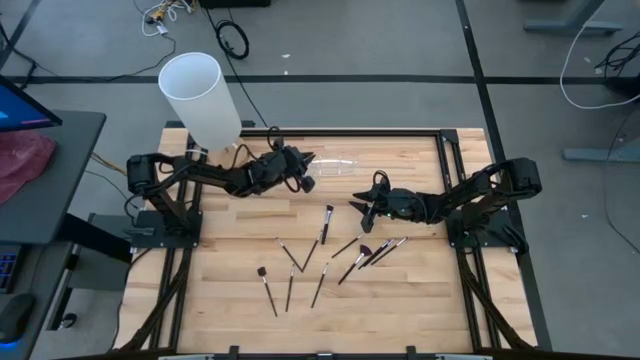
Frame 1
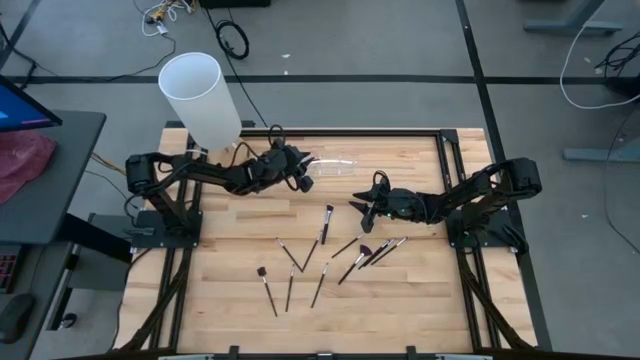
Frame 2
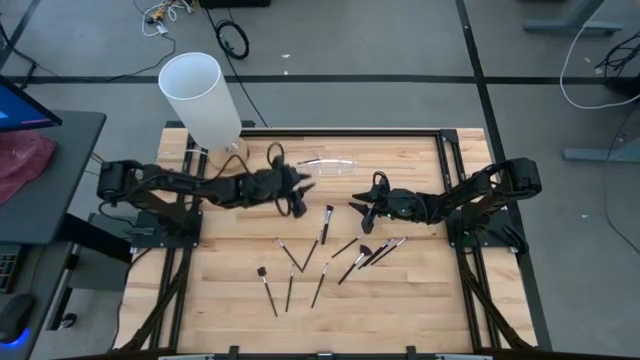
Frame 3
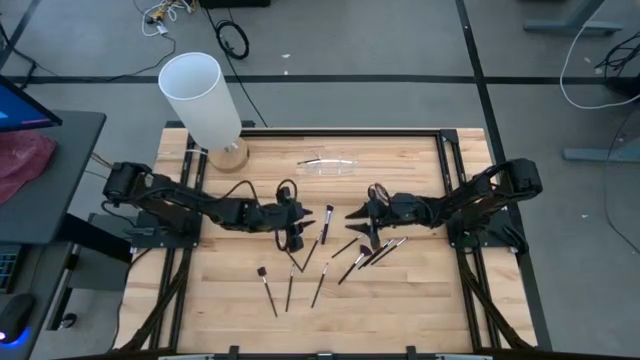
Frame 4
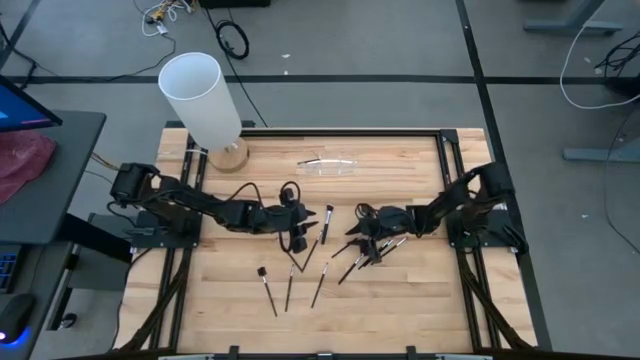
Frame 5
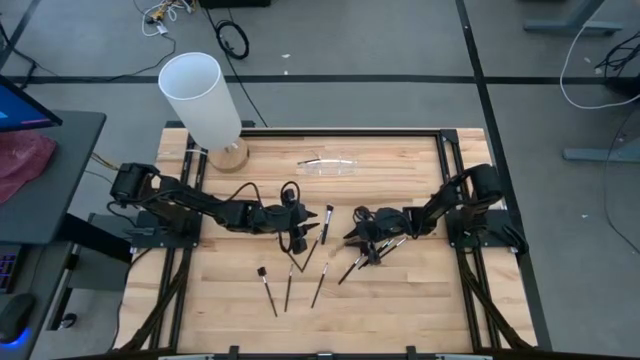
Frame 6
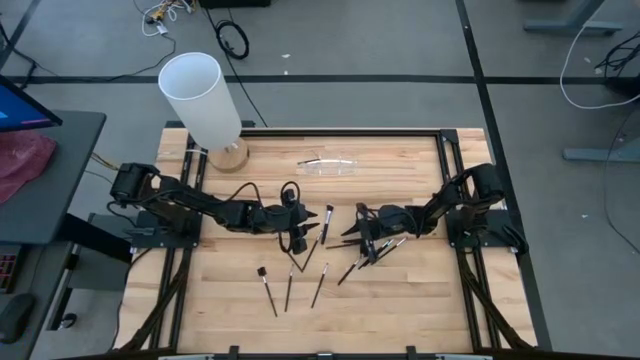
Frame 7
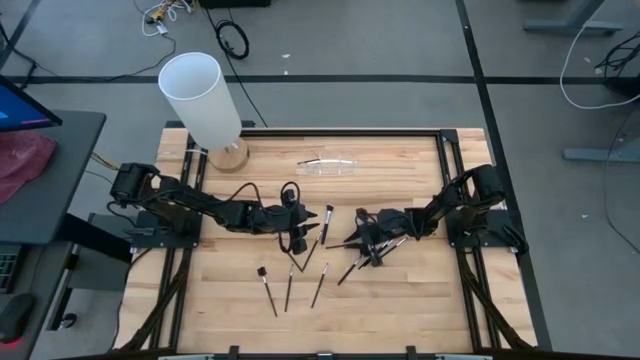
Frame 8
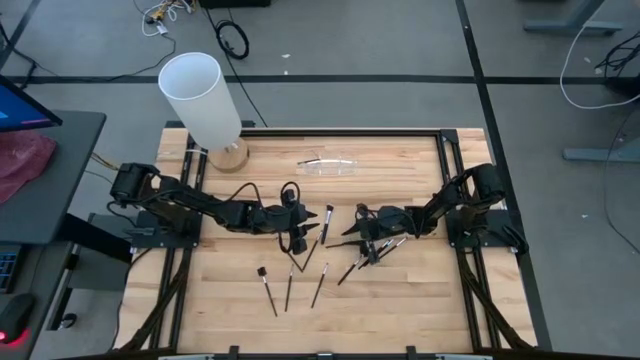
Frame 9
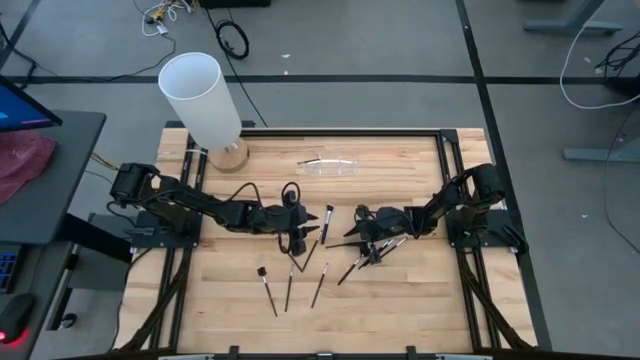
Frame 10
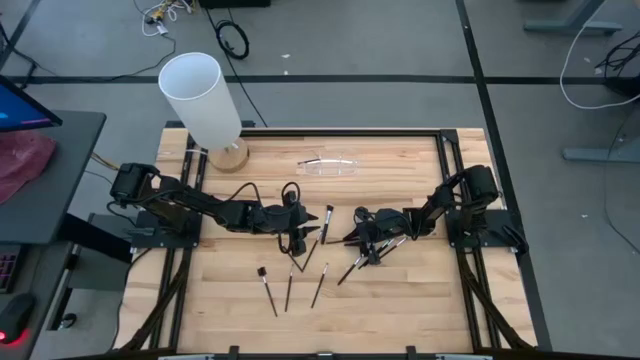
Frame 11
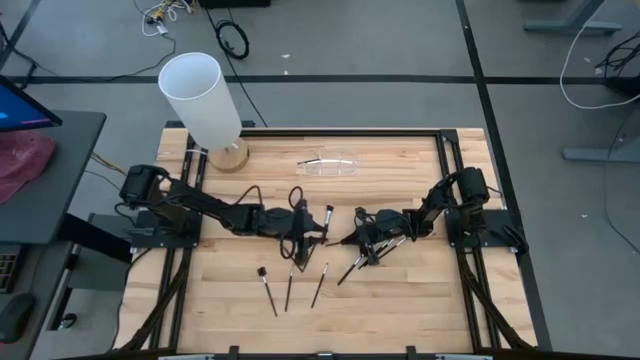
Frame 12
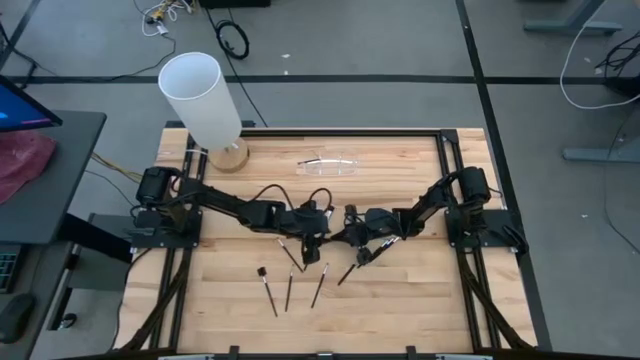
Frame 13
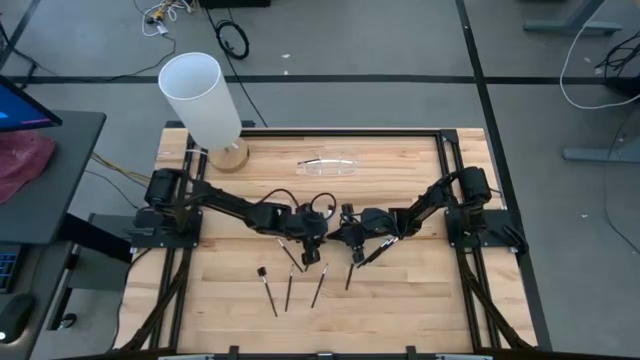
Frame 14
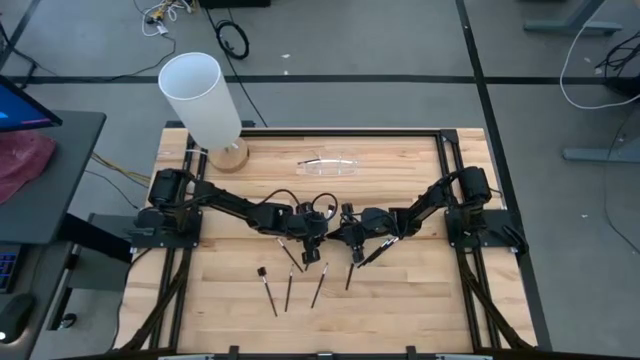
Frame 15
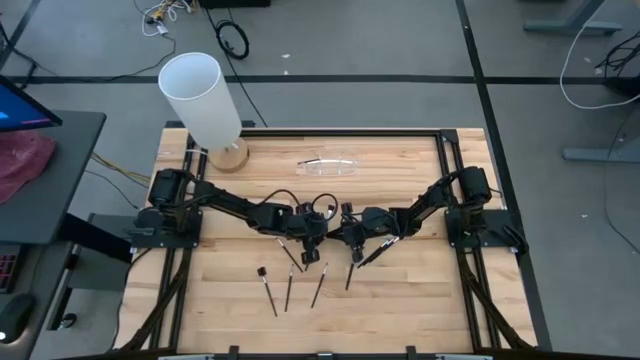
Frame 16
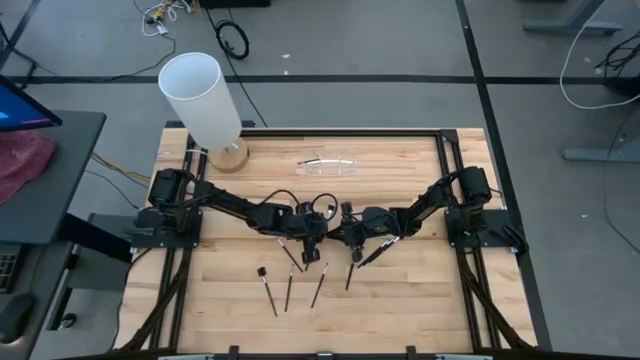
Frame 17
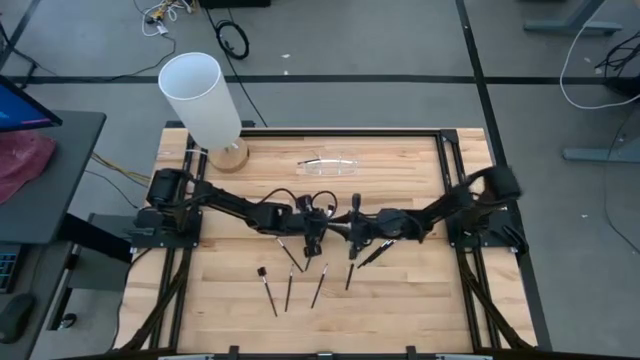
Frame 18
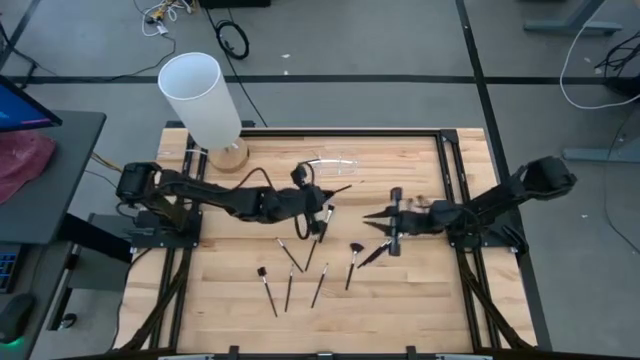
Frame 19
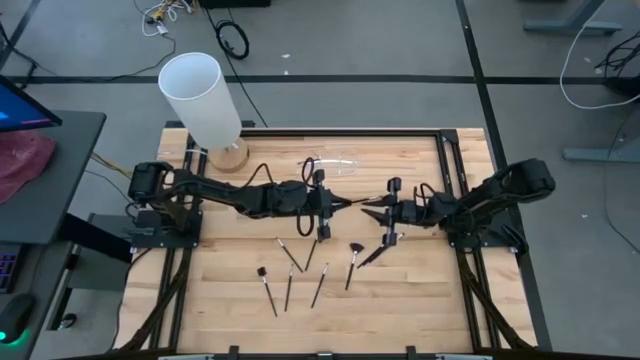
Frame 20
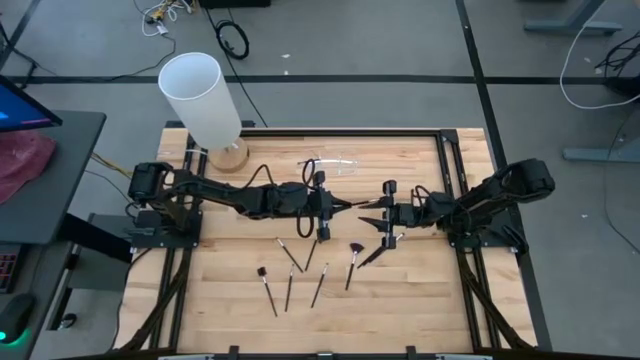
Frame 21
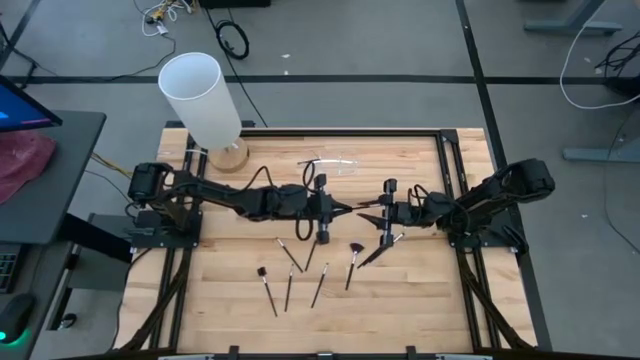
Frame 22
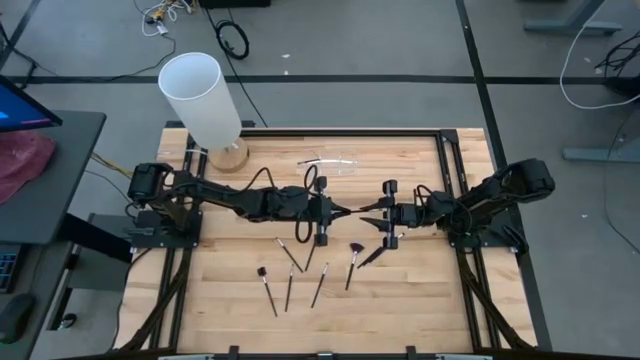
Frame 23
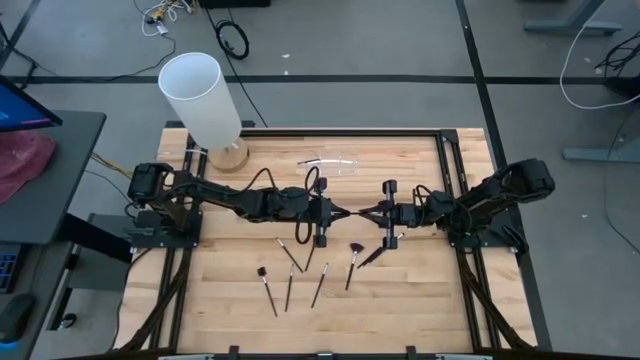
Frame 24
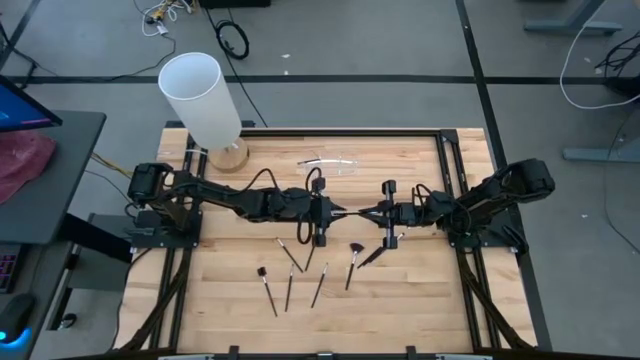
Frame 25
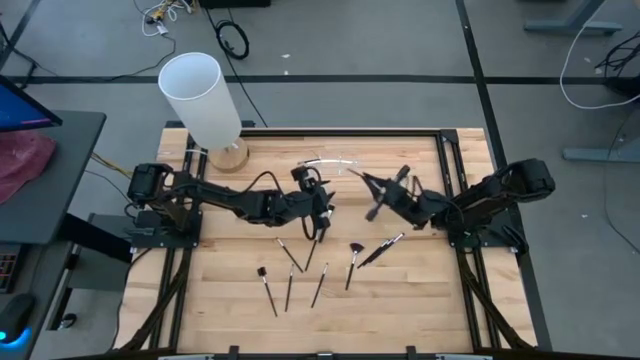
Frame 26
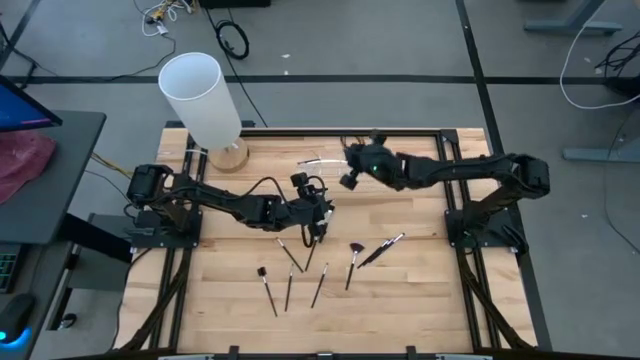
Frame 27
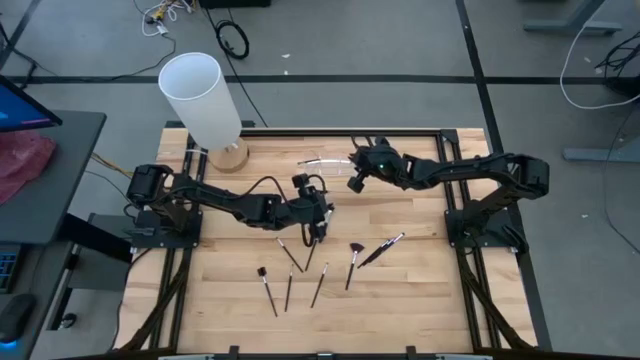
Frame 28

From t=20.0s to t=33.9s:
Task: Pick & Place Makeup Supplies
Put the makeup brush into the transparent organizer

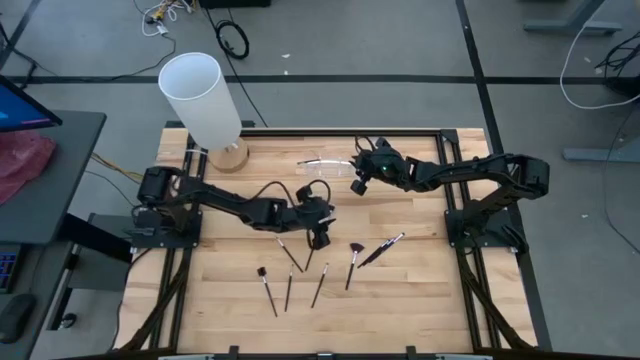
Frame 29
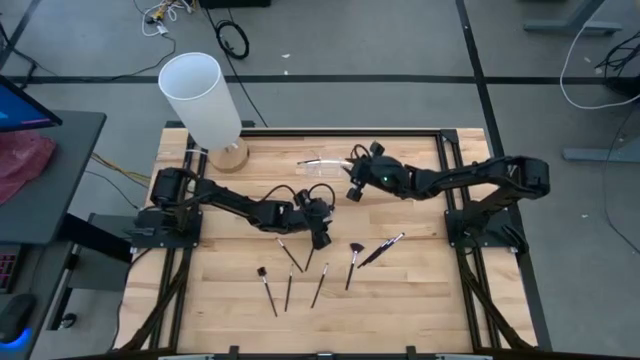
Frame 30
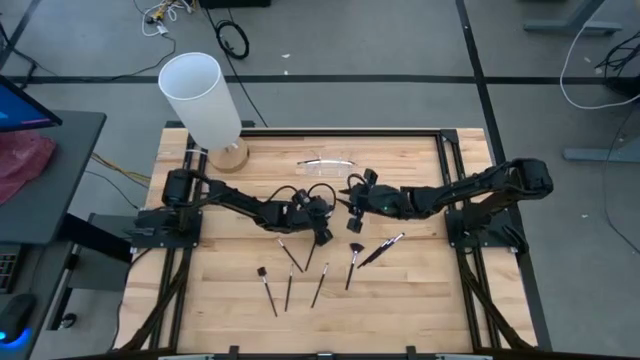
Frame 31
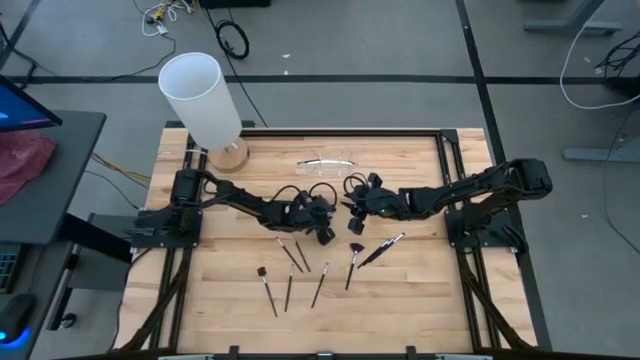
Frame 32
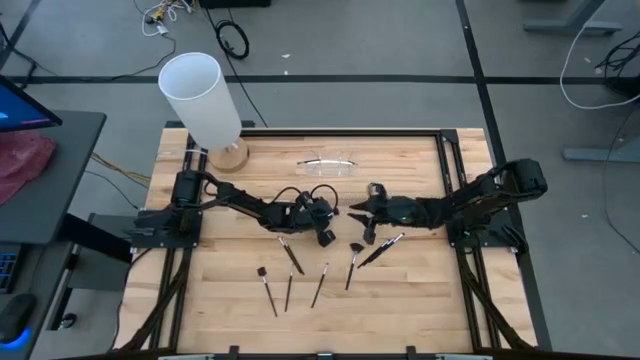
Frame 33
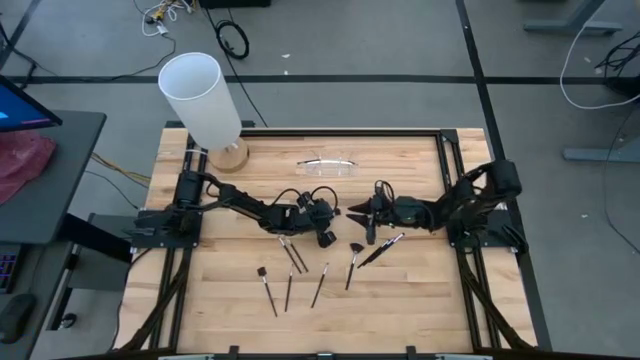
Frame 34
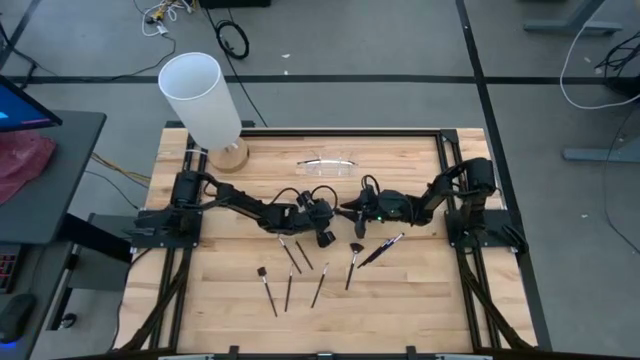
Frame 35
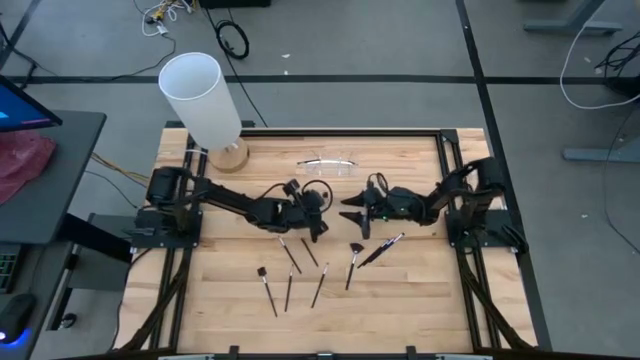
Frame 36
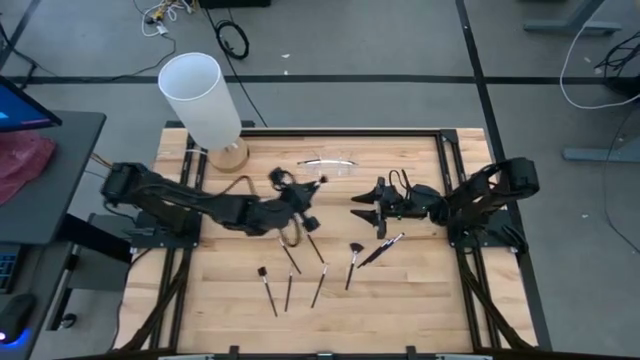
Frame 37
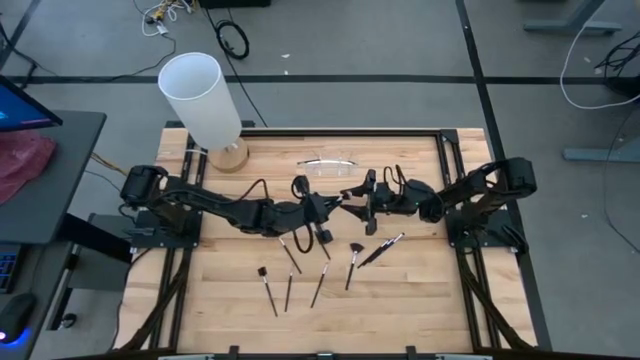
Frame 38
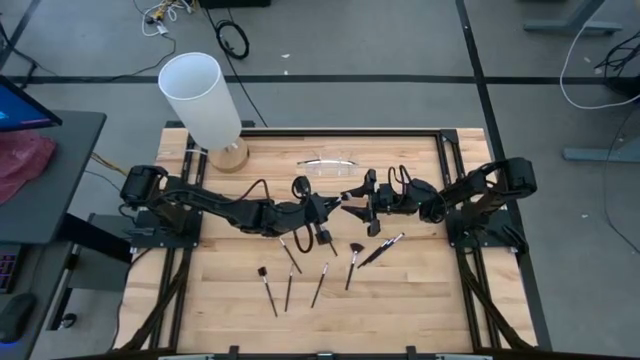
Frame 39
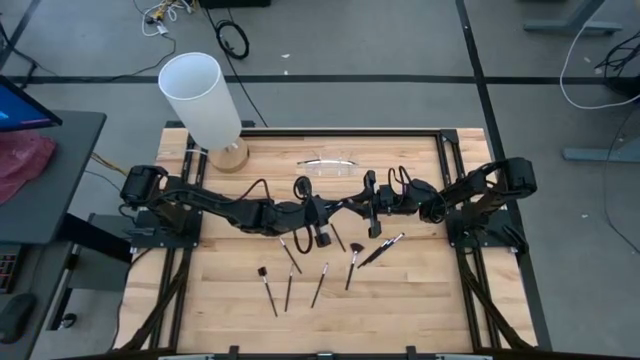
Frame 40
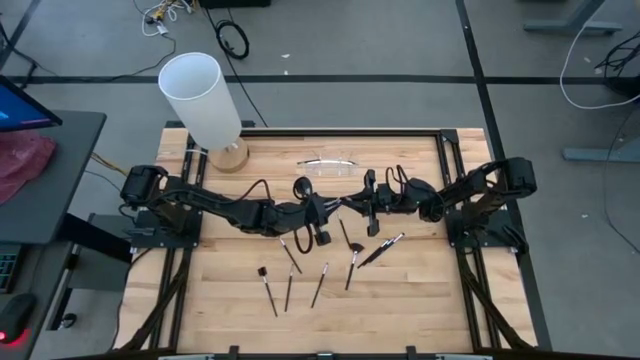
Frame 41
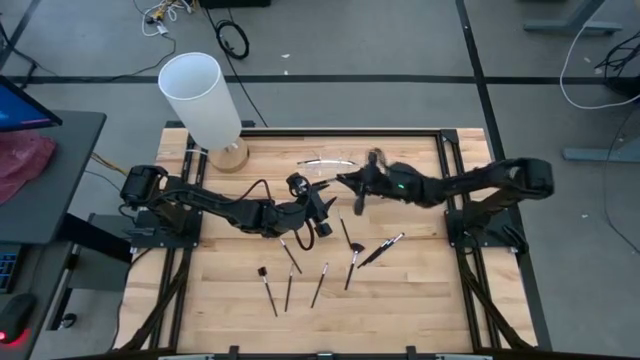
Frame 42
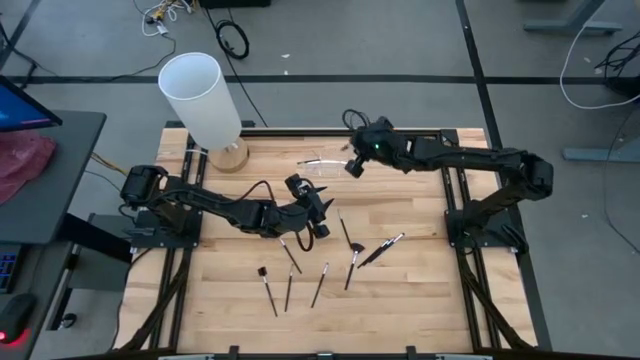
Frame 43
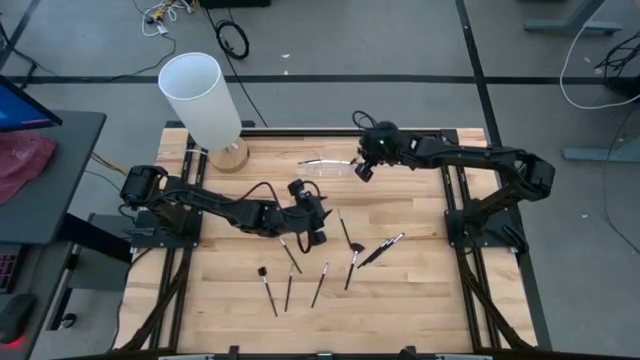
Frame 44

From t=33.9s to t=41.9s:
Put the makeup brush into the transparent organizer
